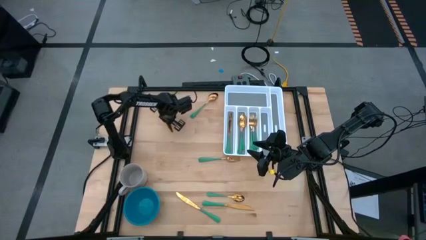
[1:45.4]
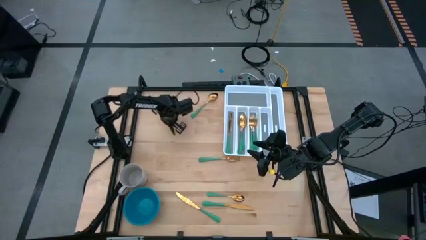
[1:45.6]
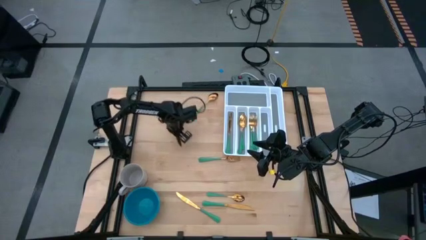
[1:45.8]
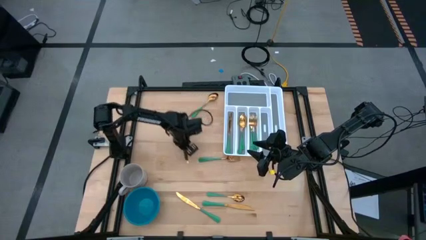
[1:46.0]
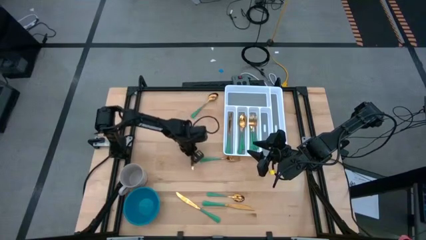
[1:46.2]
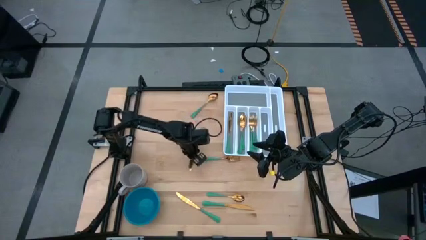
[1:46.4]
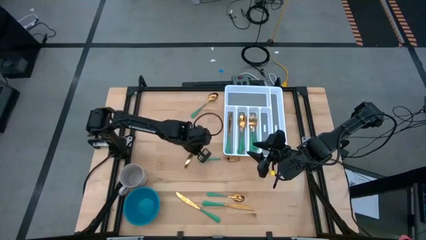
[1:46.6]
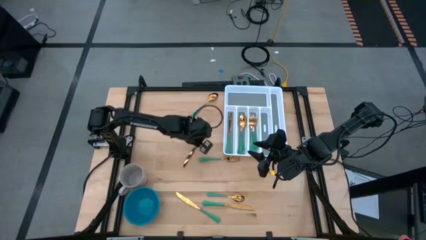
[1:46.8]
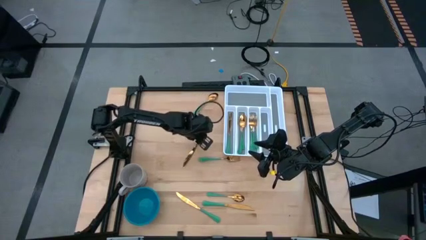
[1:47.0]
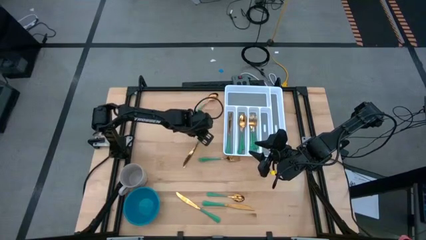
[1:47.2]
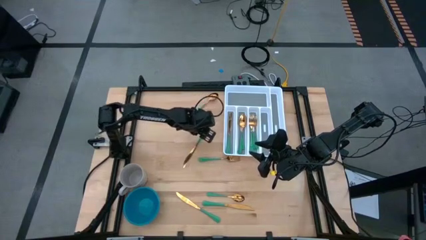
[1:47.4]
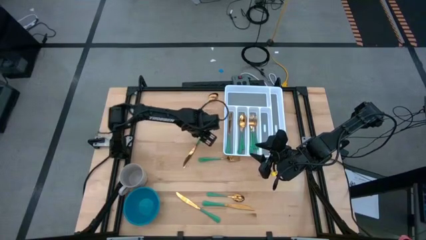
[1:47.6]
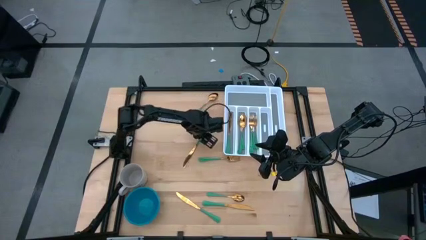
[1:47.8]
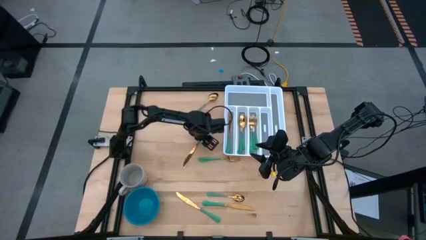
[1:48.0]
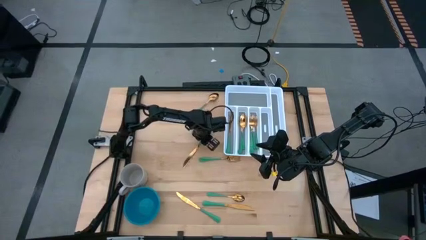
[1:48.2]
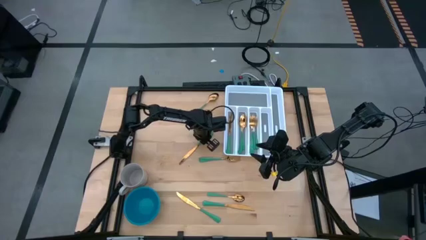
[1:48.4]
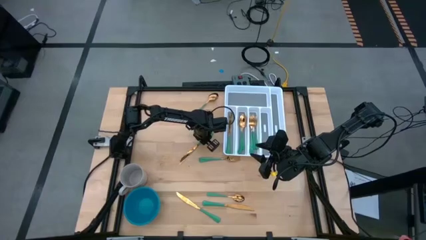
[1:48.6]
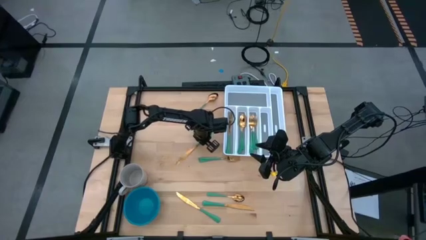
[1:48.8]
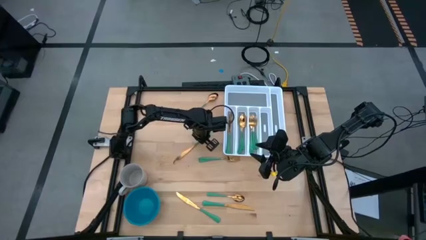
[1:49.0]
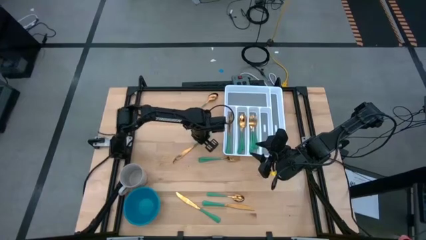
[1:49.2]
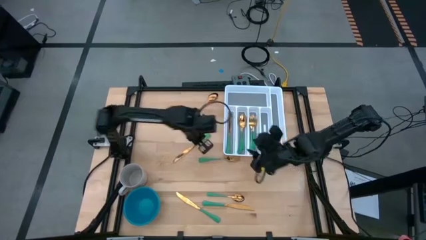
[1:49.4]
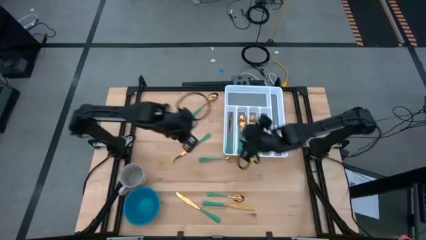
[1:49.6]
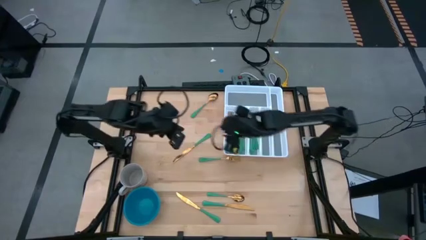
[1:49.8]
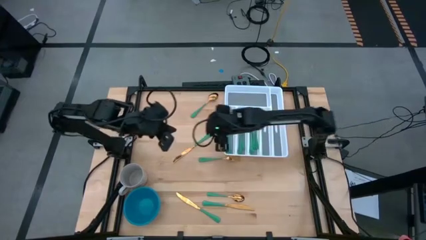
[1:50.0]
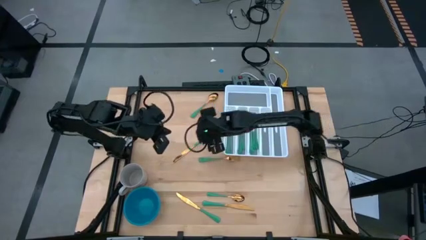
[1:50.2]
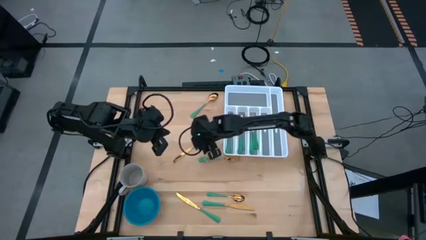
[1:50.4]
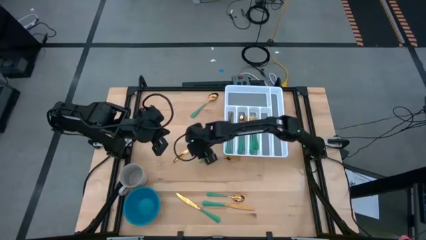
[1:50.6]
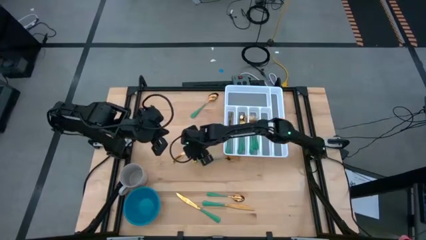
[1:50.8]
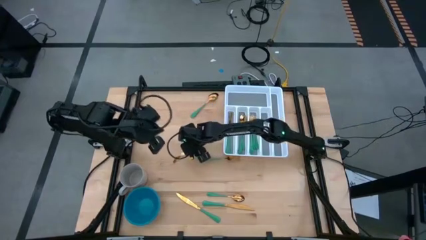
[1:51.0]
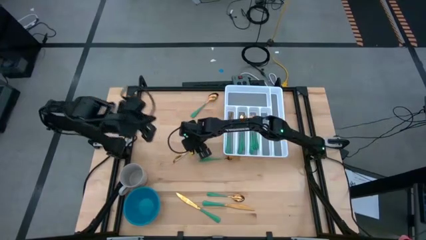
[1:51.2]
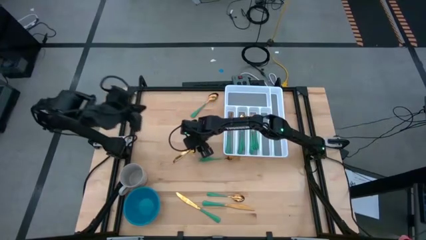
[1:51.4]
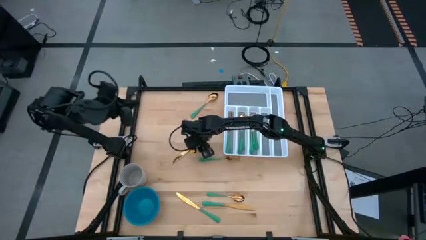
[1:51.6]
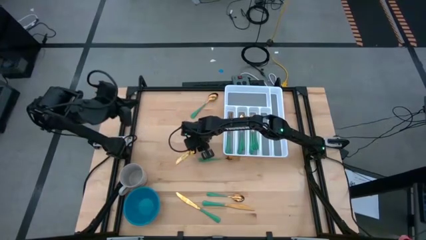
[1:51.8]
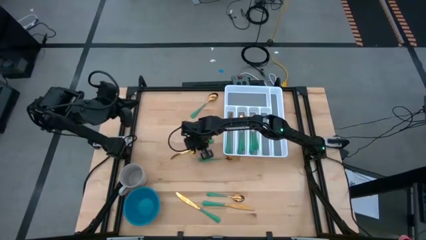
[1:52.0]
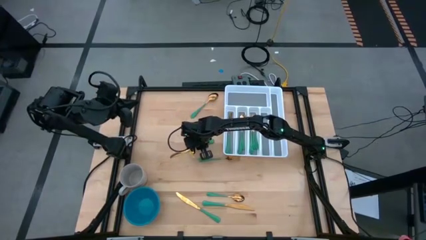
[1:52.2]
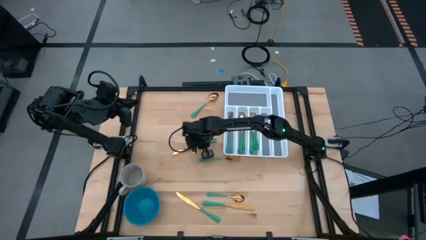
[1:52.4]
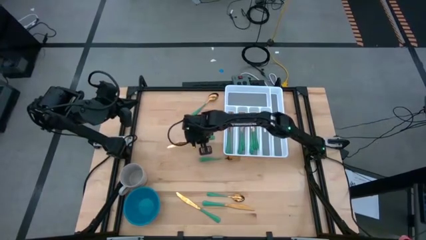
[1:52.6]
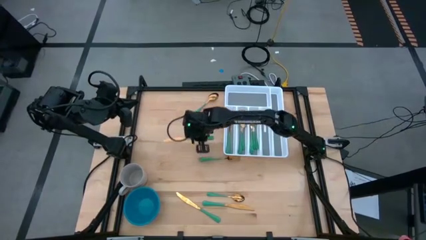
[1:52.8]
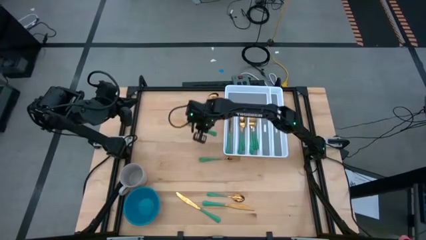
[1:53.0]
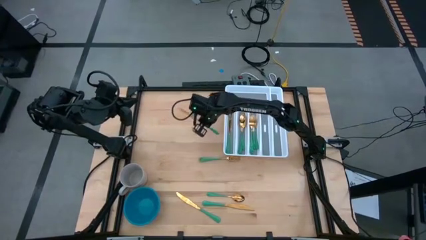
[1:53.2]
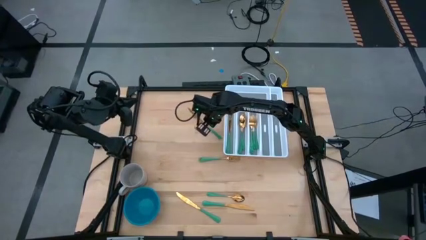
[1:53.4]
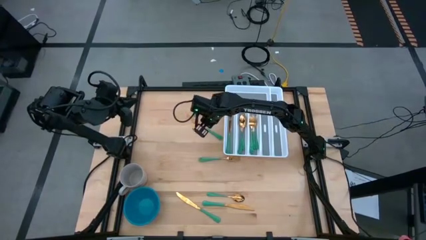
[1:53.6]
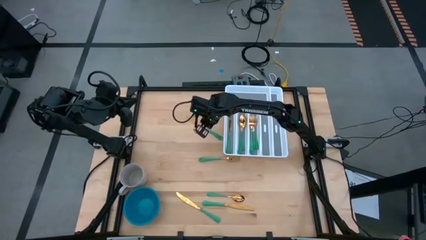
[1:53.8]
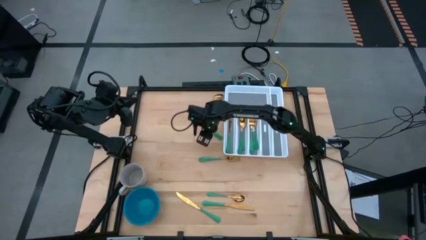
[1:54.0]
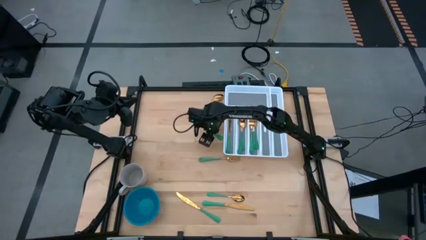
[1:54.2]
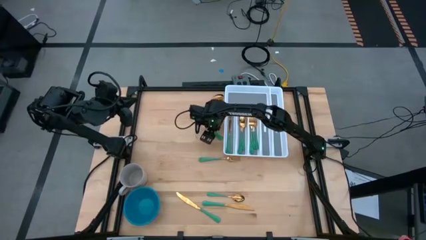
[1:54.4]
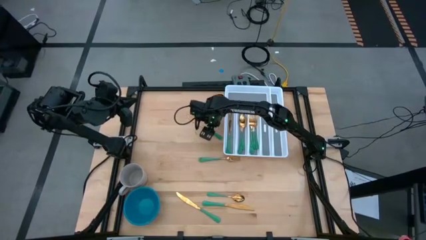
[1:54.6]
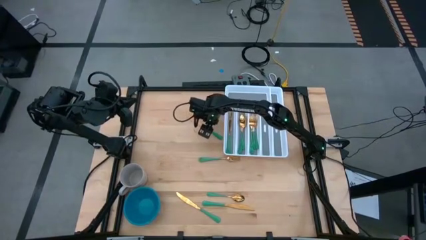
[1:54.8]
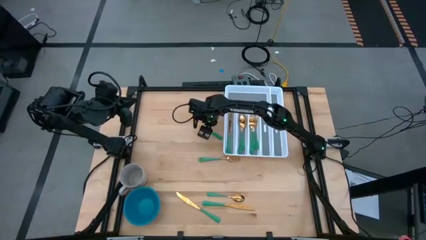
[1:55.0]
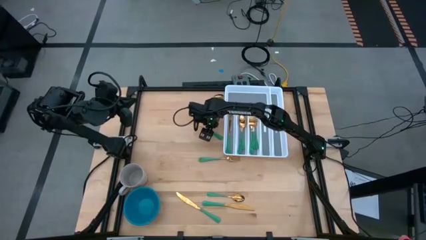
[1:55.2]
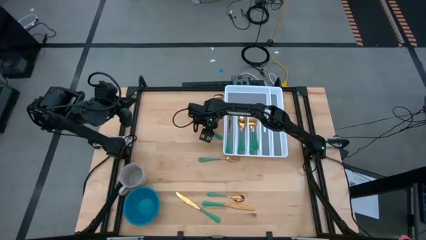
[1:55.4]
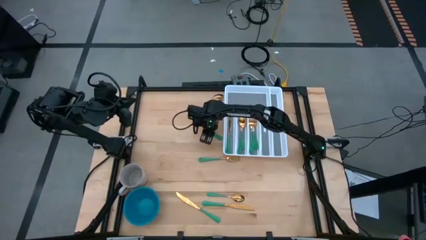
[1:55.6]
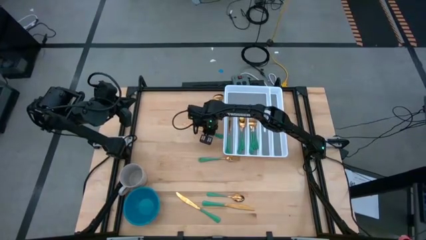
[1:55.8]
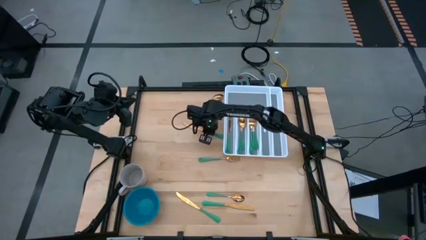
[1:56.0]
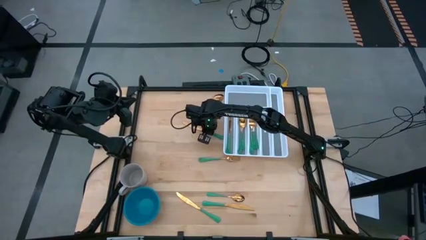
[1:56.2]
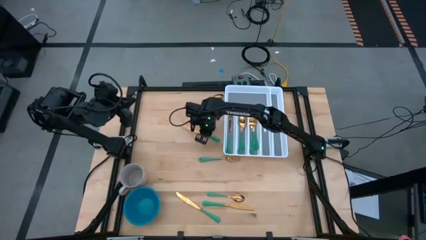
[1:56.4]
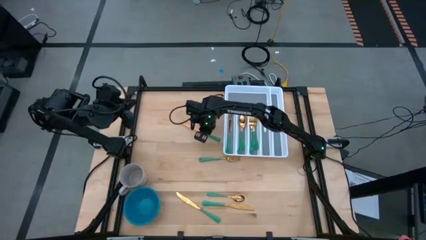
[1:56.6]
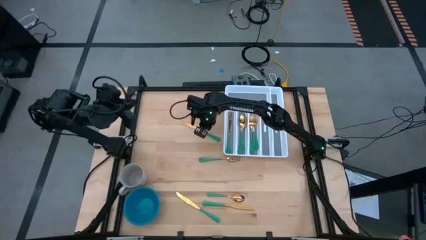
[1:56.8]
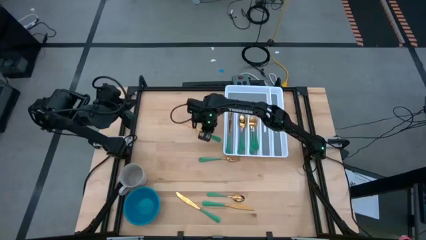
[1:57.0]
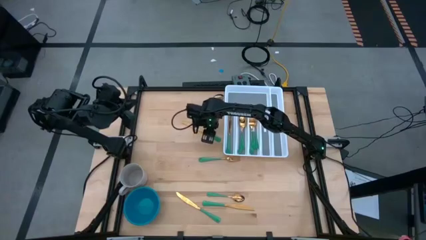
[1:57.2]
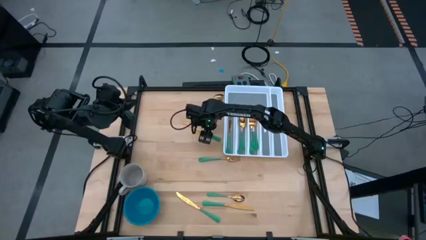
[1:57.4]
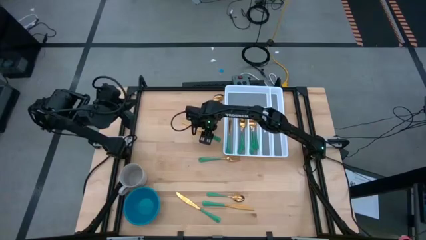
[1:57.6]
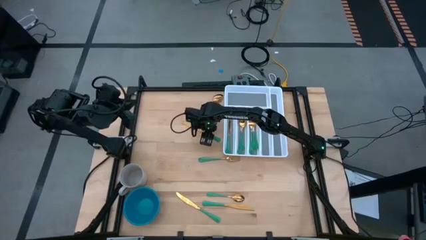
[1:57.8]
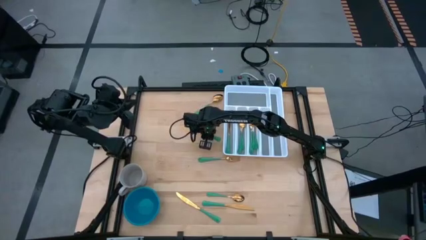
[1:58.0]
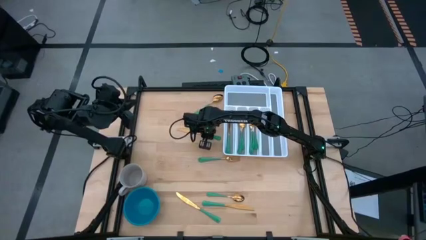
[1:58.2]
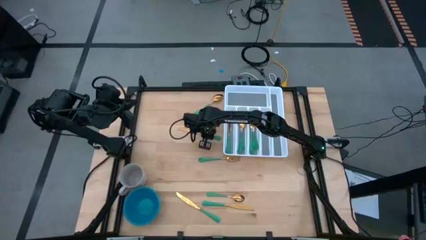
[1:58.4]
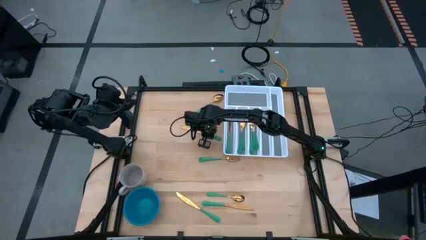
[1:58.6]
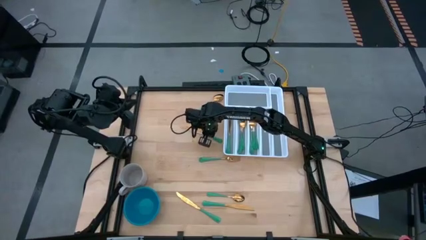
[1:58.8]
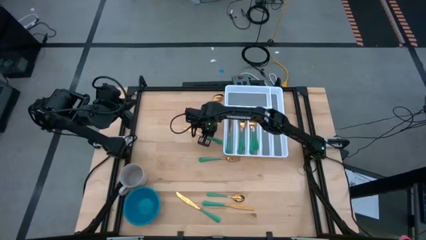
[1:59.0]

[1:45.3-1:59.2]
Task: Sort silverware
Put the top green table knife into the white cutlery tray
